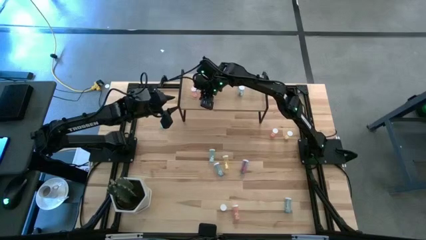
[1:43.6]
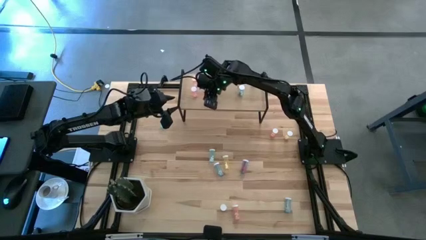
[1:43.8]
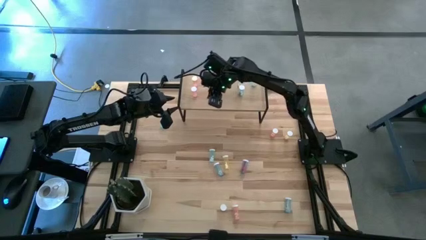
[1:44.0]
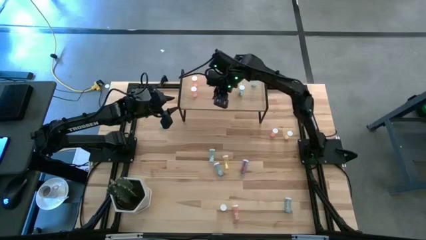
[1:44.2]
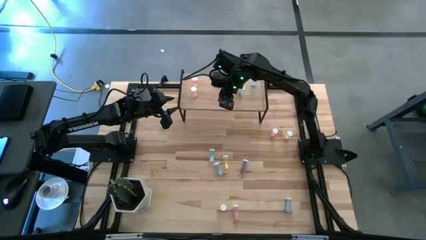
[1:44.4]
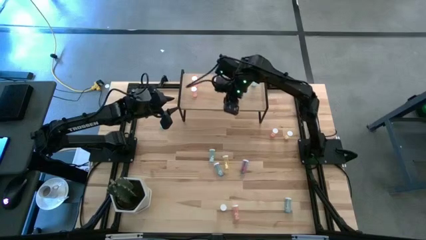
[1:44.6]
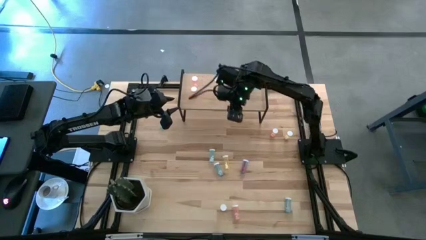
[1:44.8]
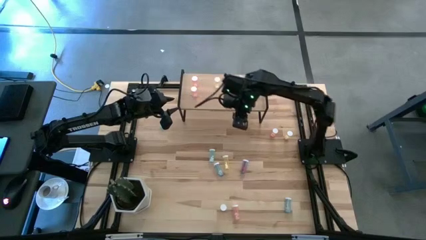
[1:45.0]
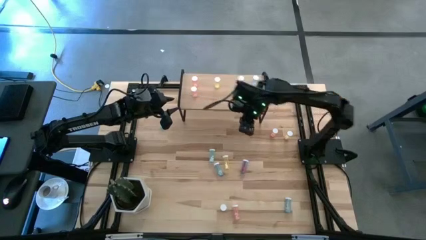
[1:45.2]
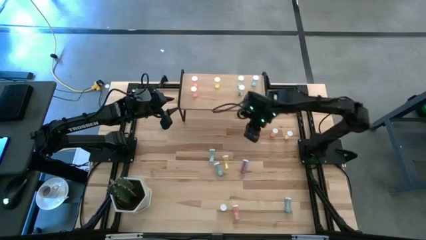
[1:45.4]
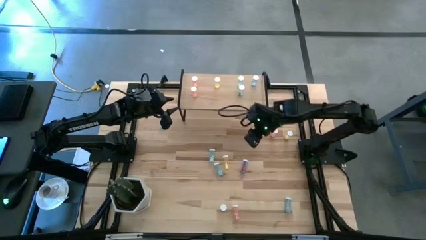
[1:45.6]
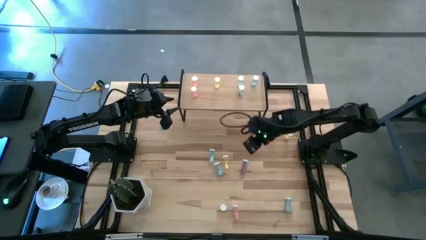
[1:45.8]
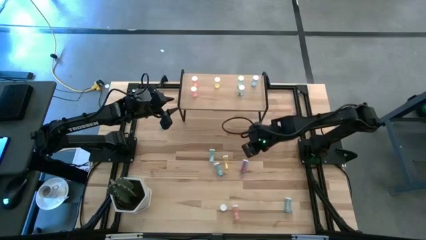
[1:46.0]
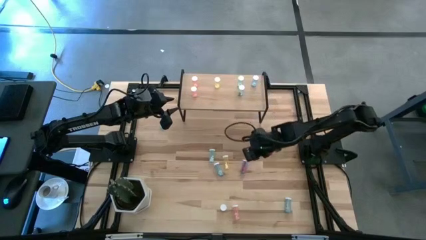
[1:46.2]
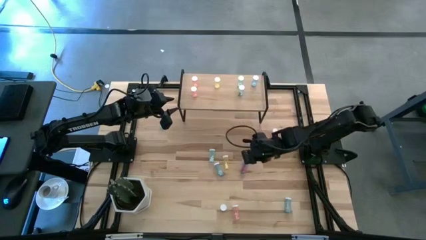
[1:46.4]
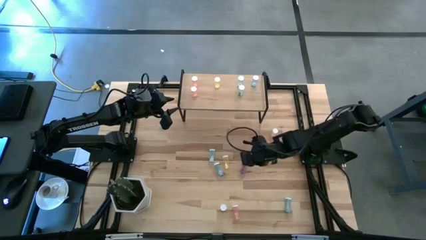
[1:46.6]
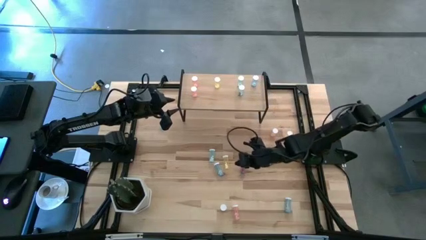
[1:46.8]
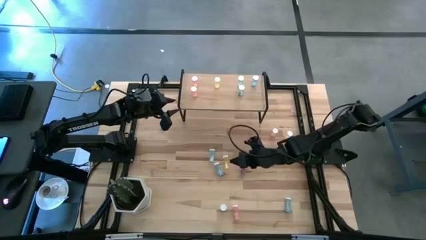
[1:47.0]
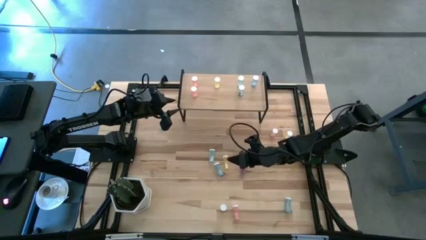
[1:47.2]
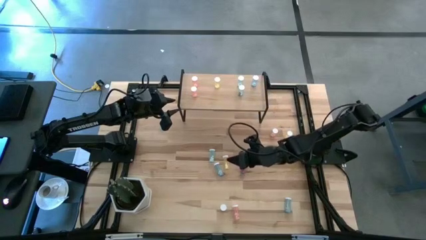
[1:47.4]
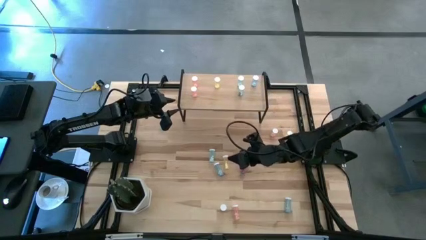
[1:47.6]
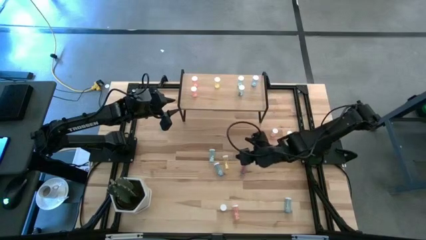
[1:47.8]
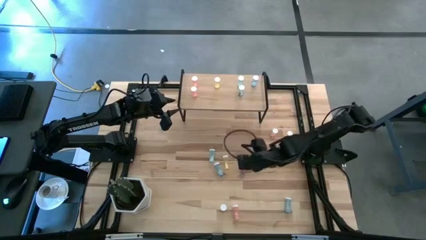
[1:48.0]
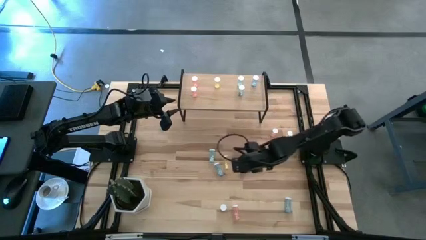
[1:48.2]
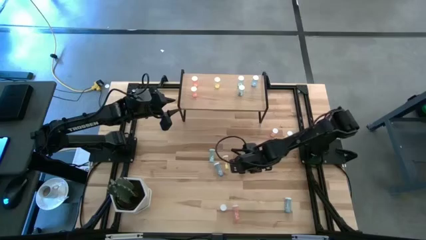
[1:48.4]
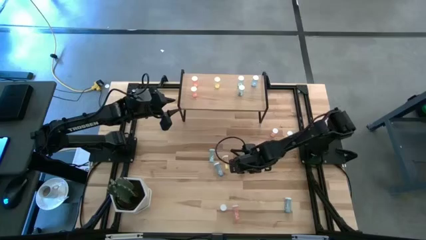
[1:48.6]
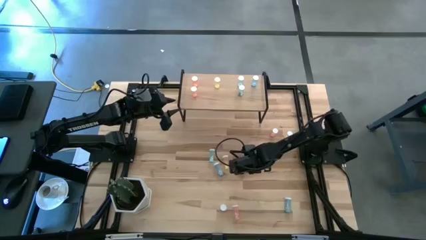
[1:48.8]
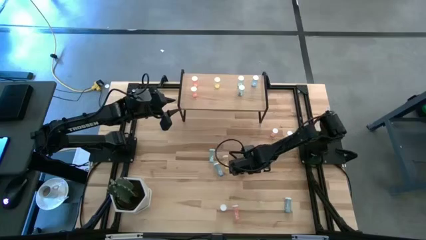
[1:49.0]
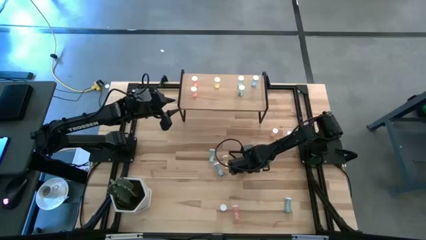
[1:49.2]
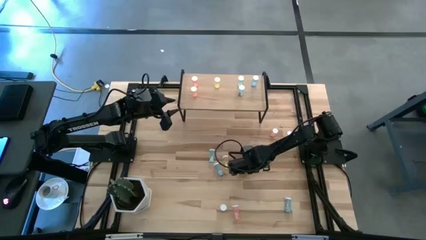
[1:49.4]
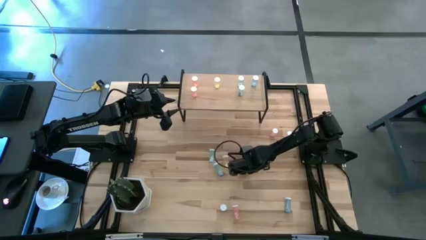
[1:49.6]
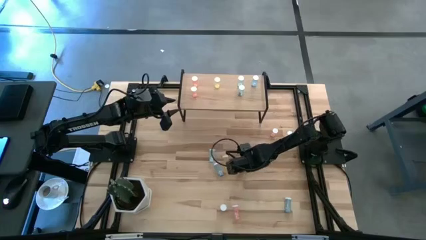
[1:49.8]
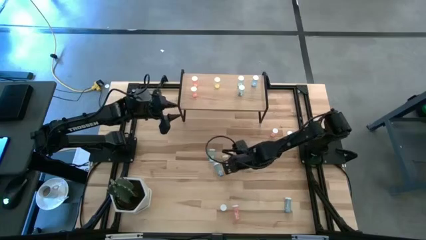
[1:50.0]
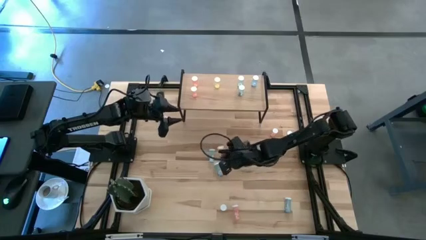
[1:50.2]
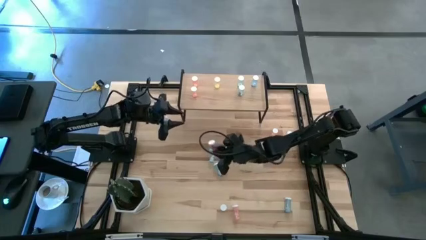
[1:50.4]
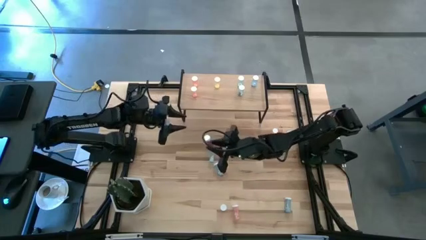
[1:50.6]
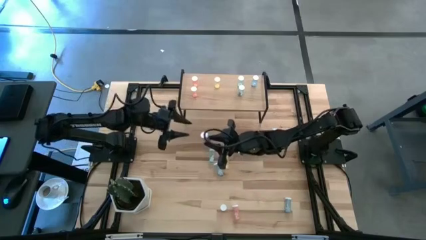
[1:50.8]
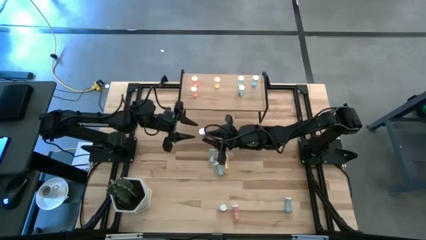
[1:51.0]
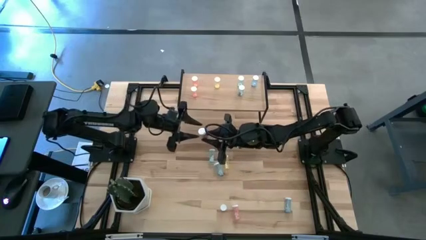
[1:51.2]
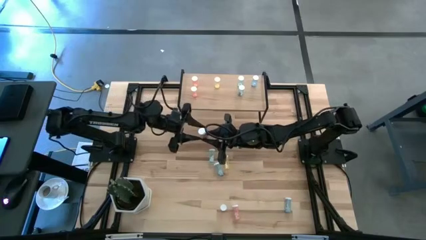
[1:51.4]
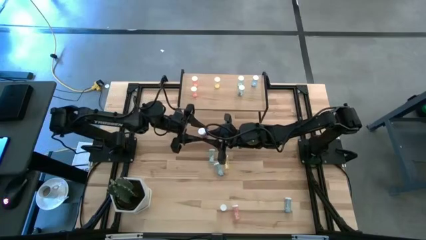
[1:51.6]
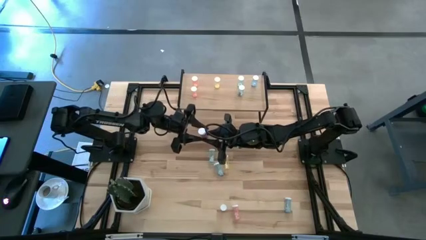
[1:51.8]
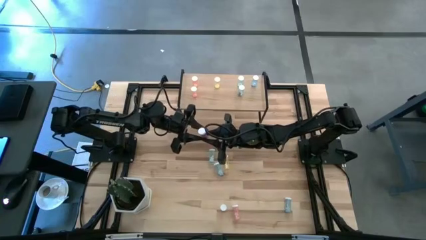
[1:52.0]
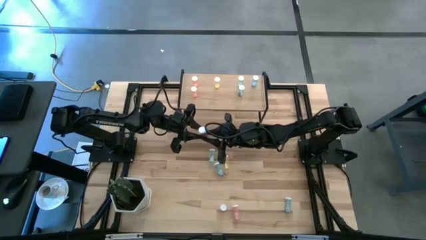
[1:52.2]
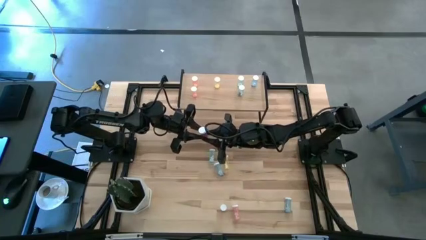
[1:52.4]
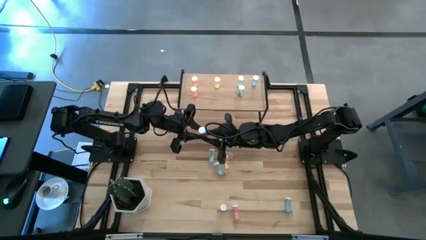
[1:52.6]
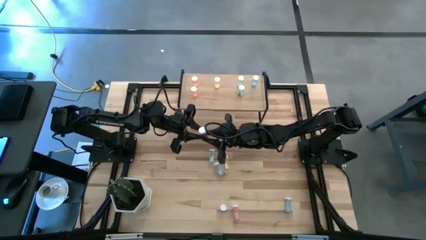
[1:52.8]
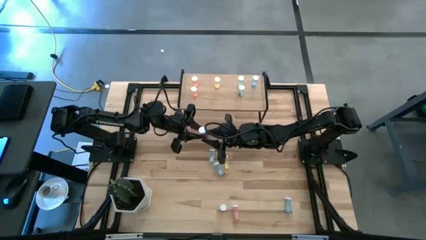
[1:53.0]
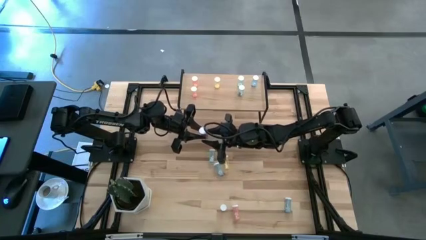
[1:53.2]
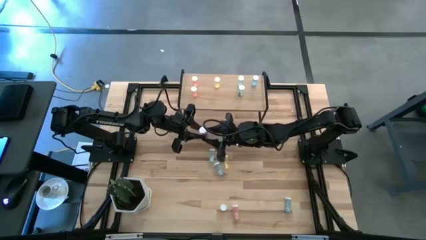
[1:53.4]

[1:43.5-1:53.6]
Task: Pick and place medicine bottles onto shelf by color
Put the blue pill bottle on the shelf aligned with the other blue pill bottle
